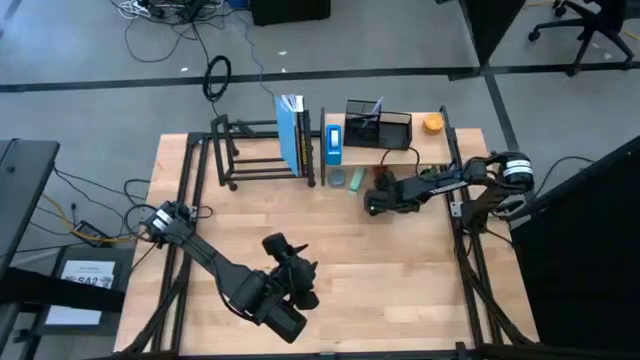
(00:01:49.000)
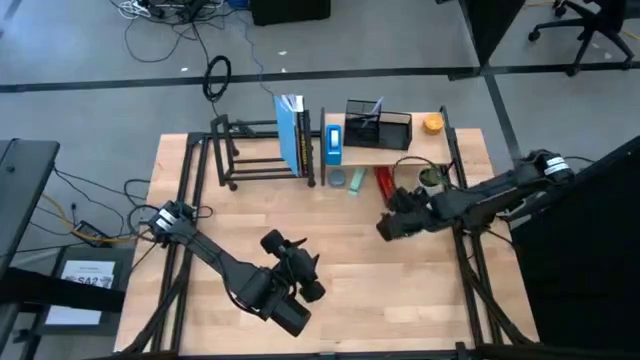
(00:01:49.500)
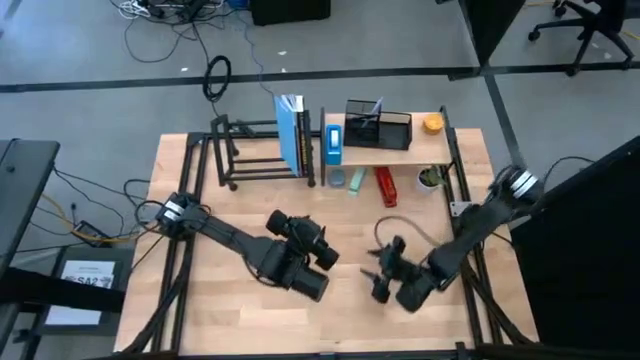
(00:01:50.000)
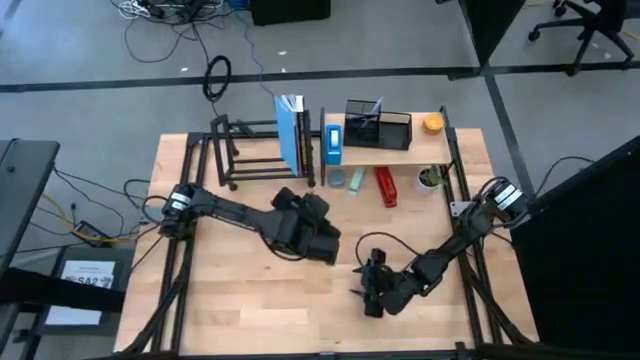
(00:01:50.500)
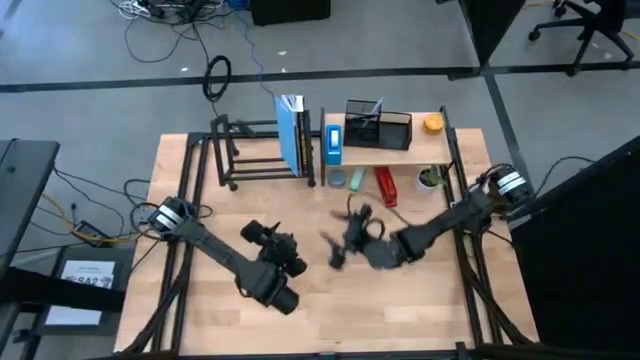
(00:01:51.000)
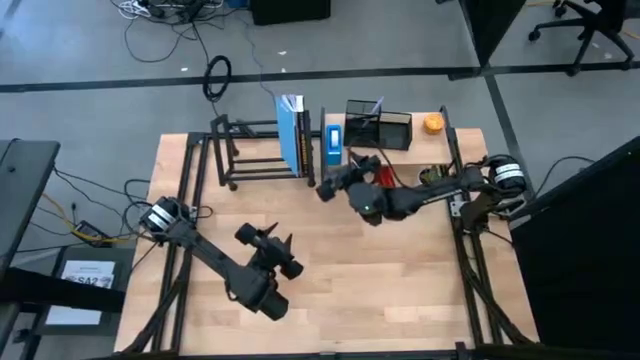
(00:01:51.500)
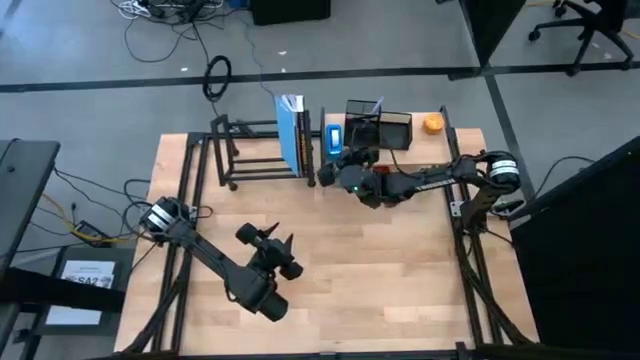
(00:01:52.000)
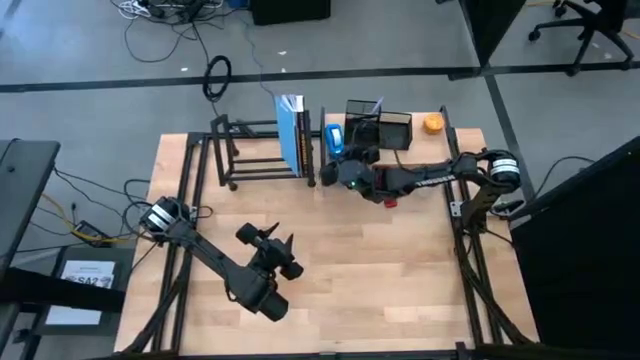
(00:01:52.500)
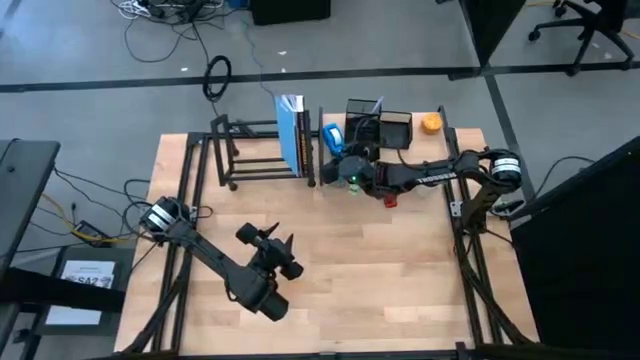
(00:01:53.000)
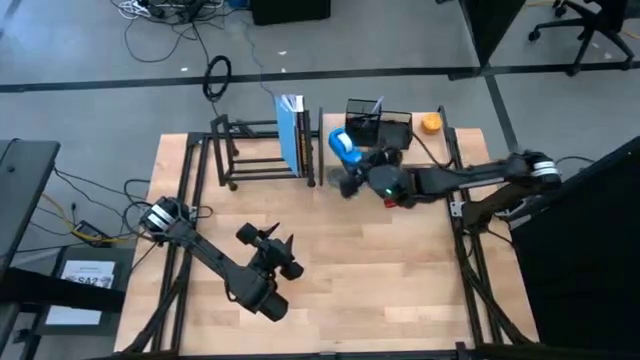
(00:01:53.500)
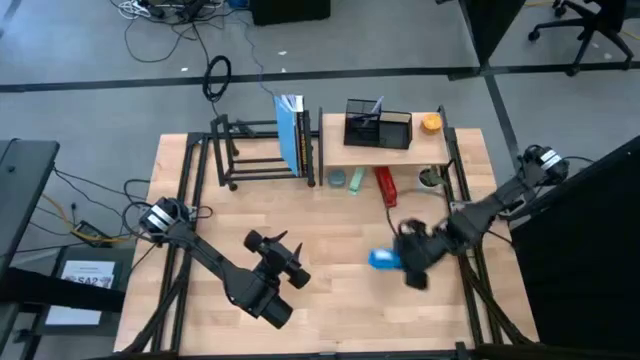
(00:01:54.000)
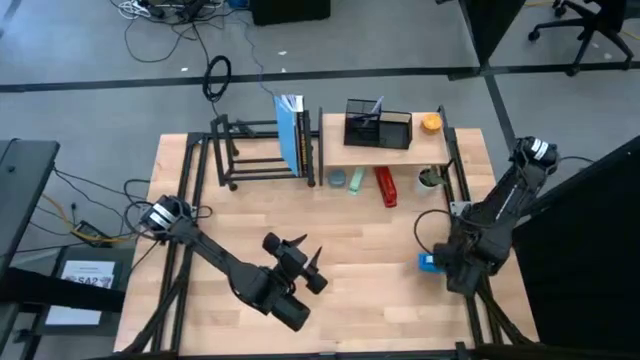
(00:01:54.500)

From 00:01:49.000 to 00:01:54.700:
Task: Stock shelves
Remove the blue tape dispenser from the shelf

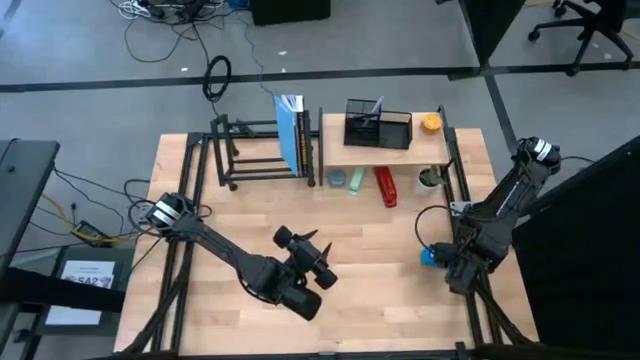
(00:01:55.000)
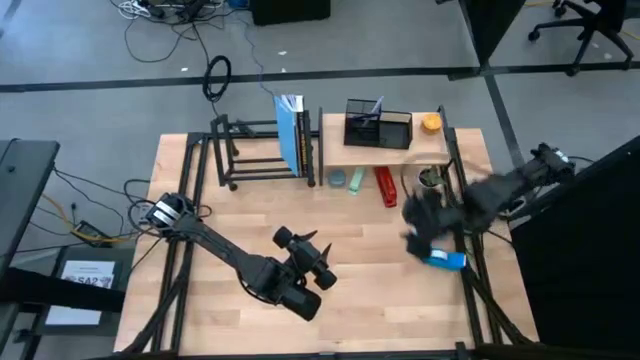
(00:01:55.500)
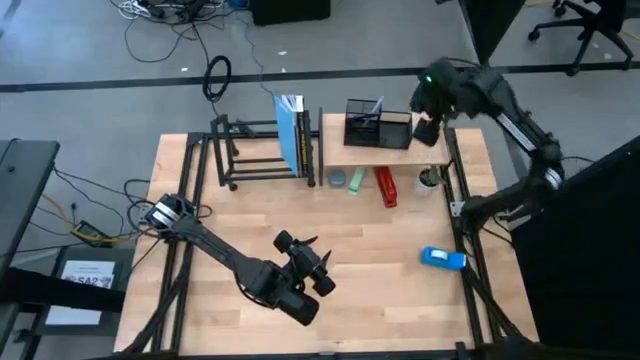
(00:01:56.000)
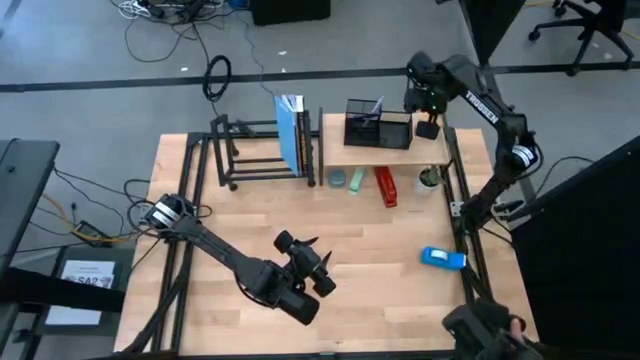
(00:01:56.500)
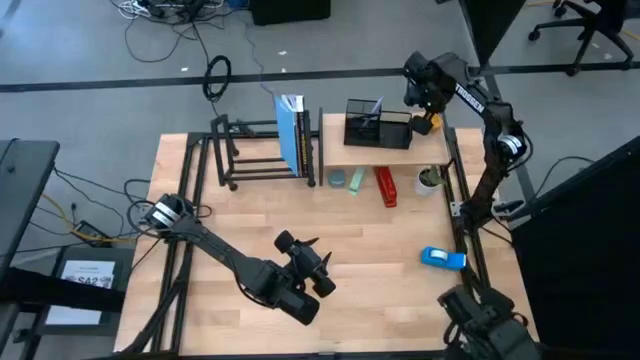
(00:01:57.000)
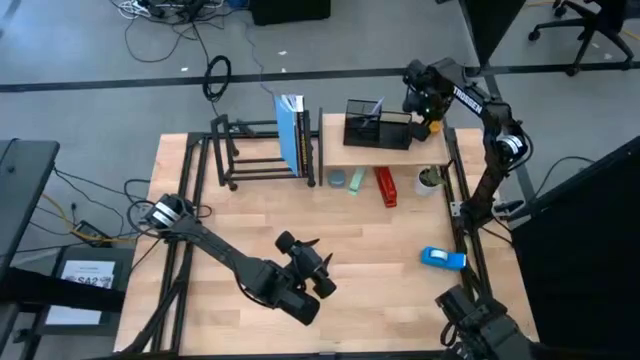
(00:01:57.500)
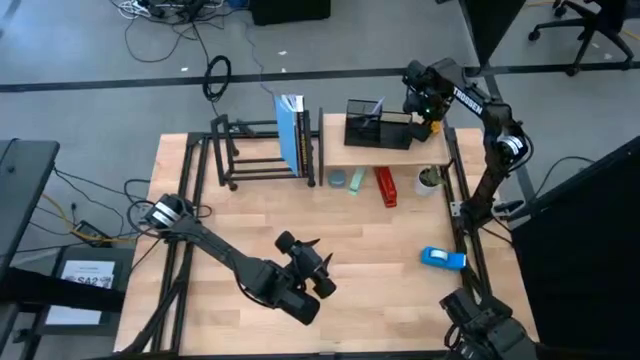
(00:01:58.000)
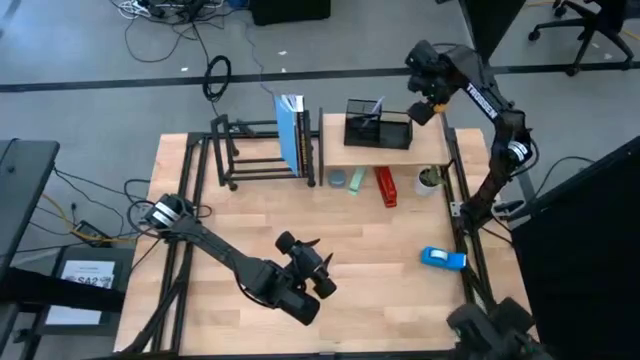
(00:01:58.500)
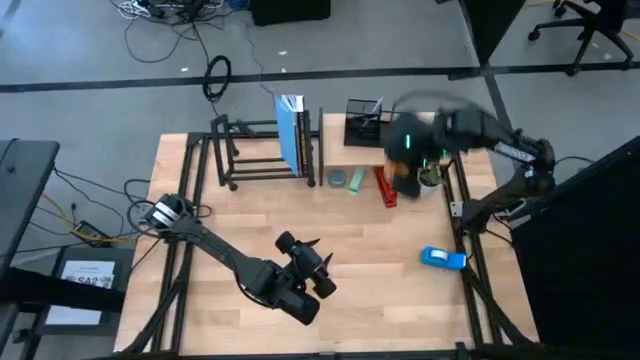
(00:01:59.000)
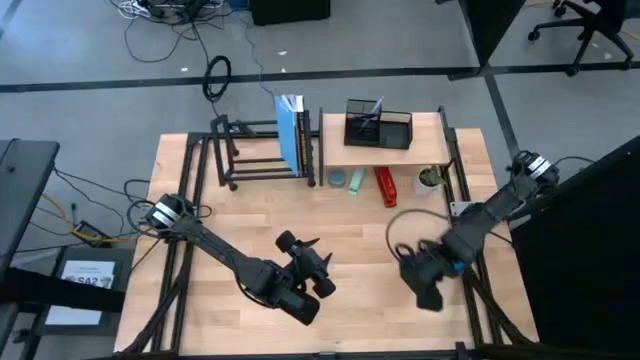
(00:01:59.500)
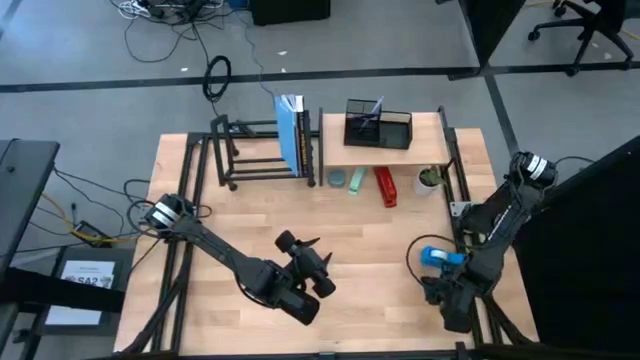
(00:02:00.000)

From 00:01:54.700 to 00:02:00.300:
Remove the yellow scented candle from the shelf

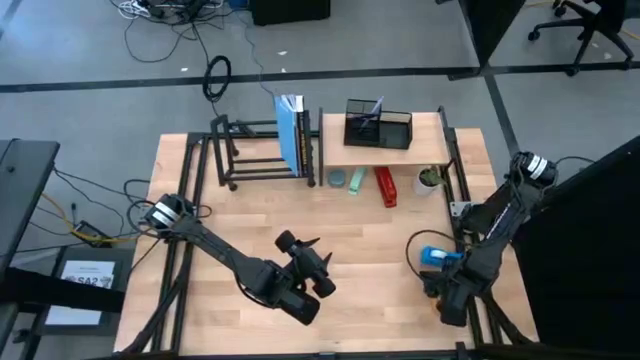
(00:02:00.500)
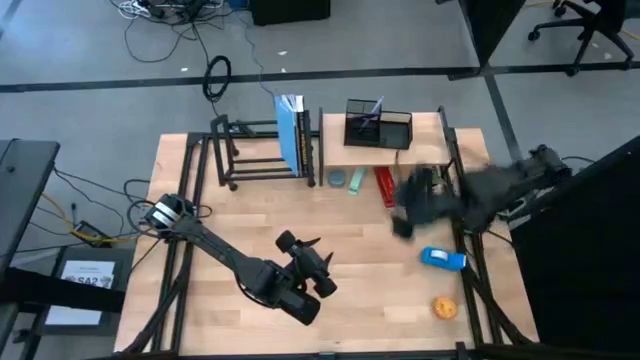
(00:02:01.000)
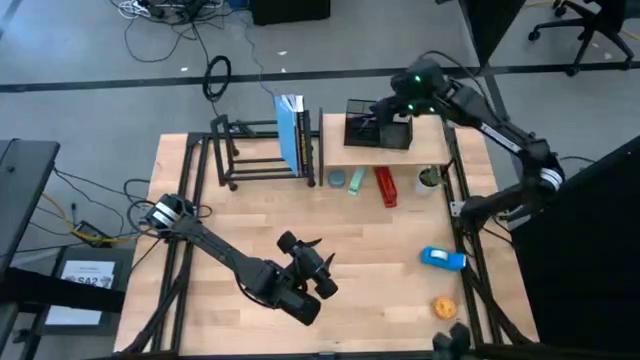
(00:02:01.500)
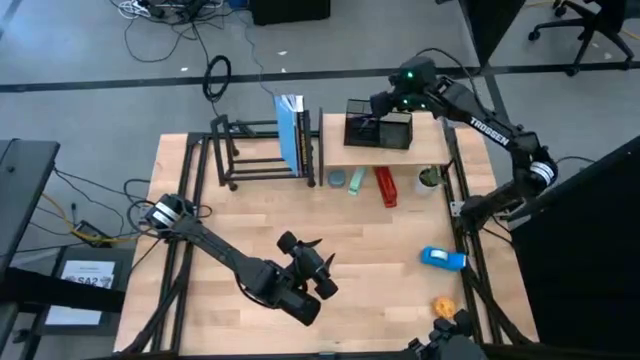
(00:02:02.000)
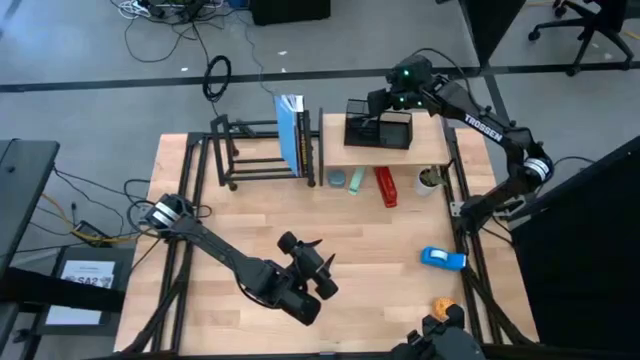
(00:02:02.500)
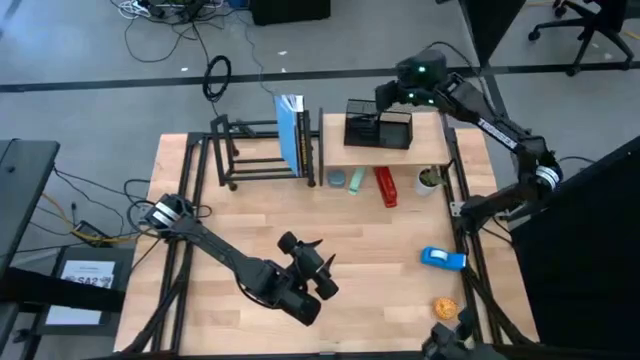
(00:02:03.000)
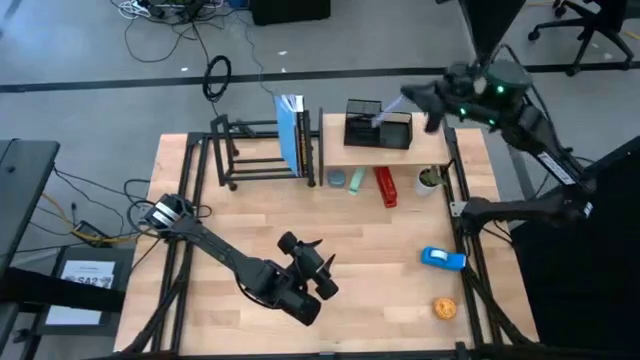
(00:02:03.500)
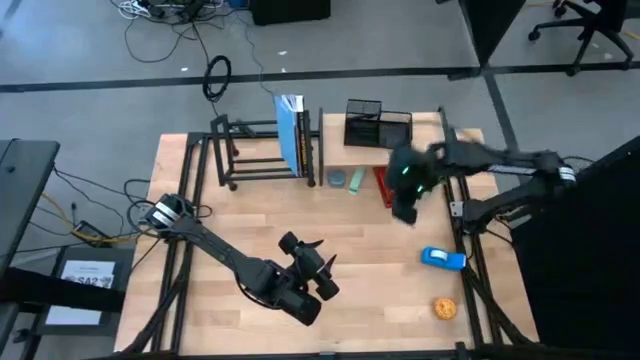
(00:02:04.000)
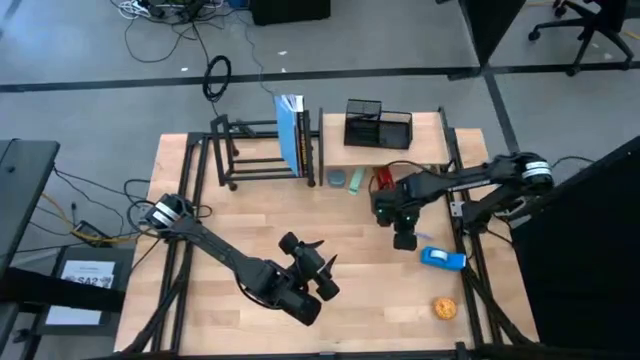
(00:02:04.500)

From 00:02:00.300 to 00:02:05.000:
Remove the purple pen from the pen organizer on the shelf

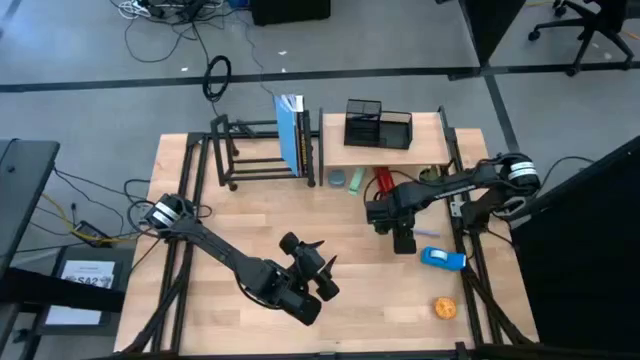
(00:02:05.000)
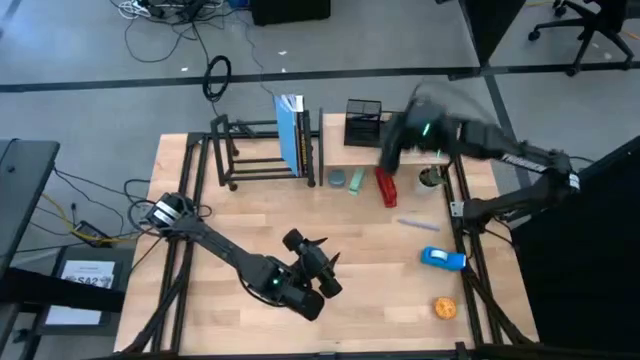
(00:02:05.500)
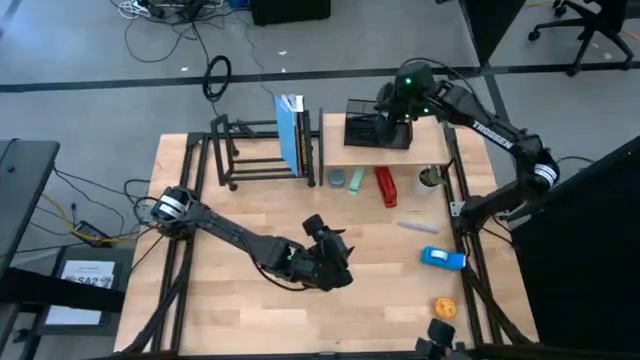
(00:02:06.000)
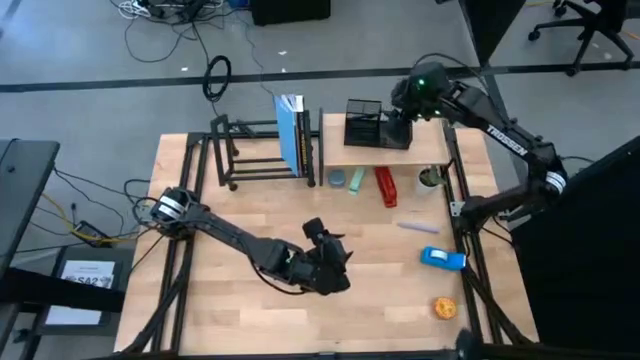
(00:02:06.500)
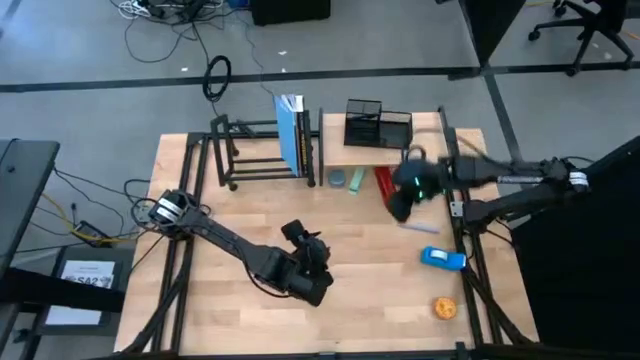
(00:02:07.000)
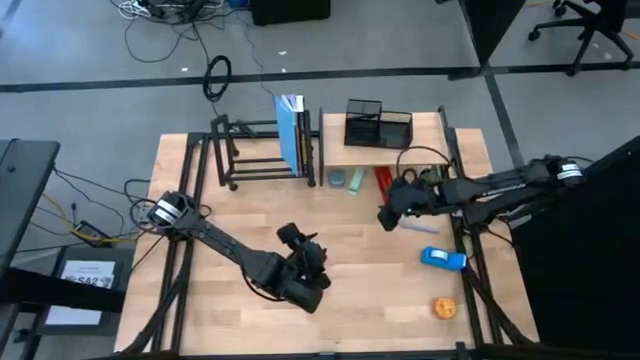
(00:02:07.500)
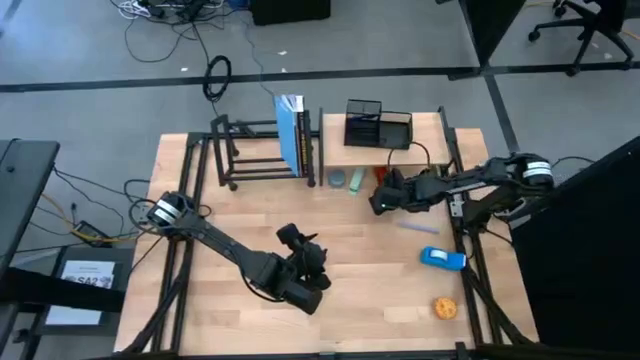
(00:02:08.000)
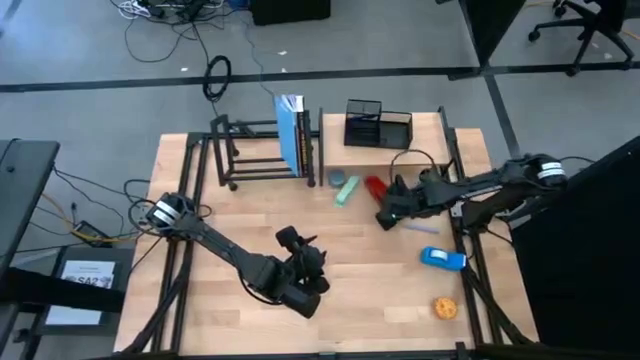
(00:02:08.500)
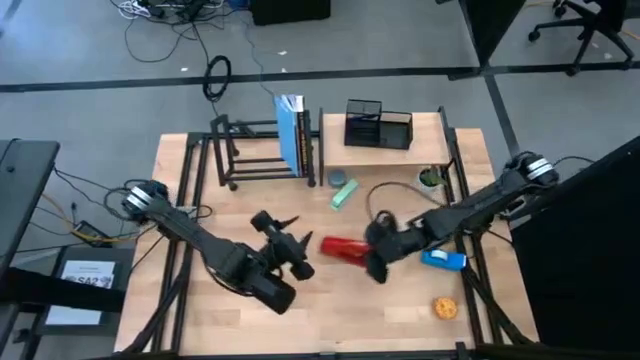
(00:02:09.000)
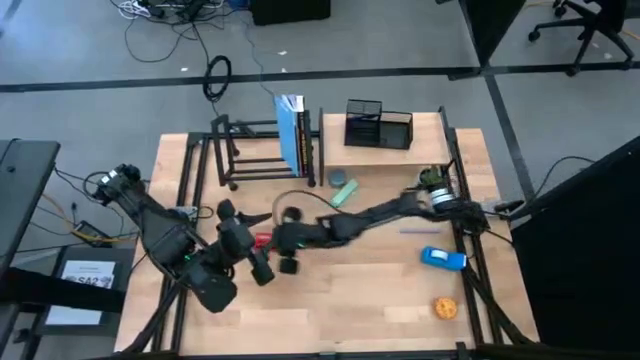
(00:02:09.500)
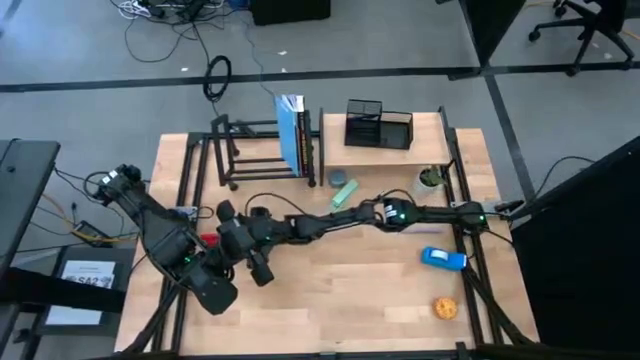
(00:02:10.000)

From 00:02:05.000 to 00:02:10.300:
Remove the red stapler from under the shelf
